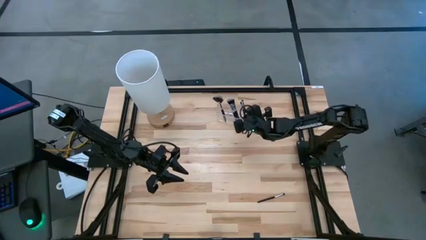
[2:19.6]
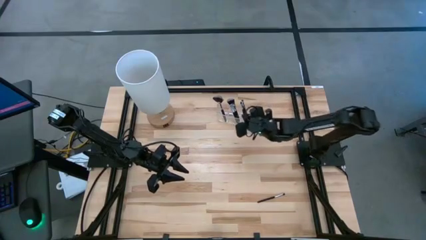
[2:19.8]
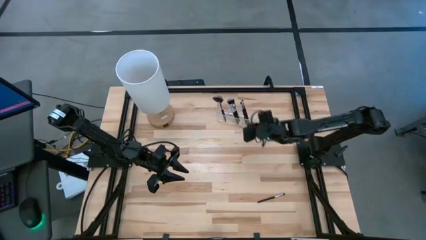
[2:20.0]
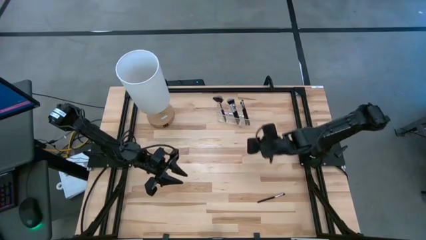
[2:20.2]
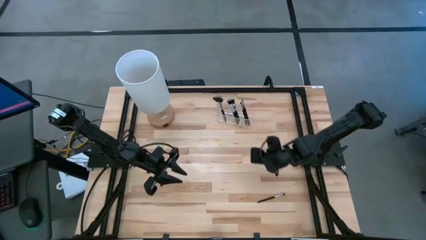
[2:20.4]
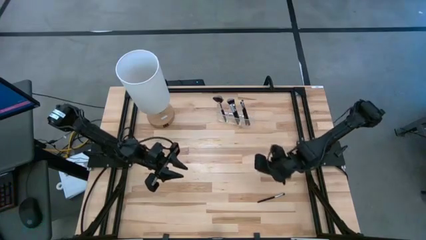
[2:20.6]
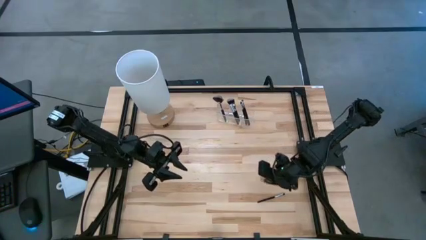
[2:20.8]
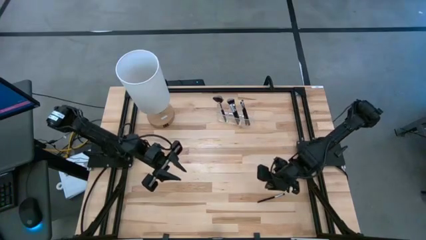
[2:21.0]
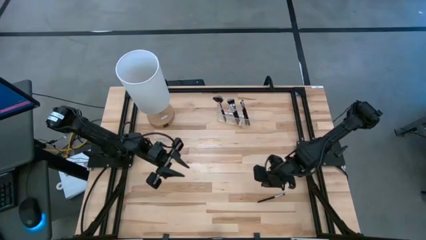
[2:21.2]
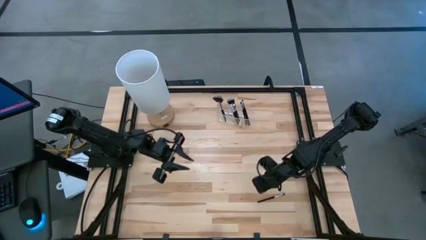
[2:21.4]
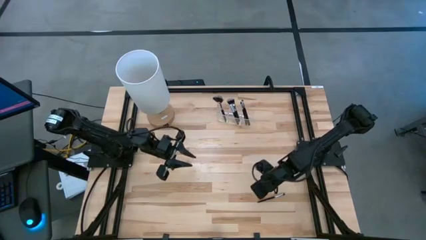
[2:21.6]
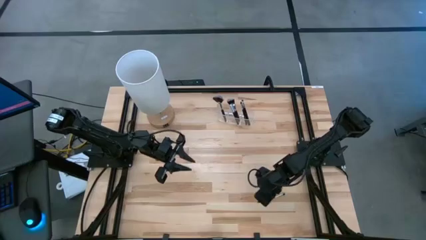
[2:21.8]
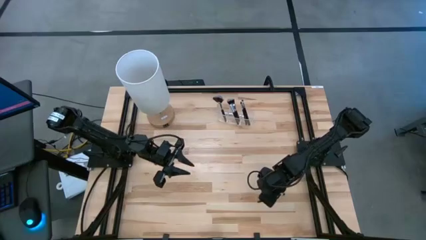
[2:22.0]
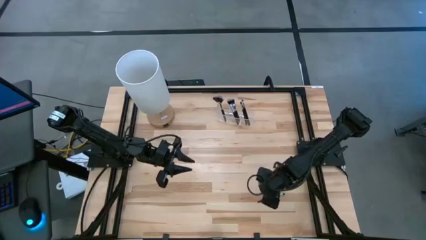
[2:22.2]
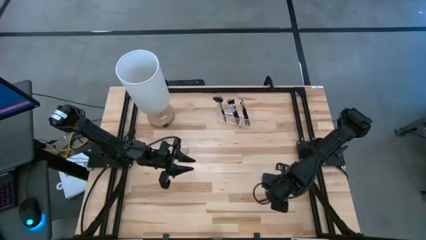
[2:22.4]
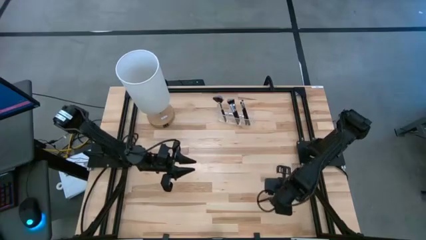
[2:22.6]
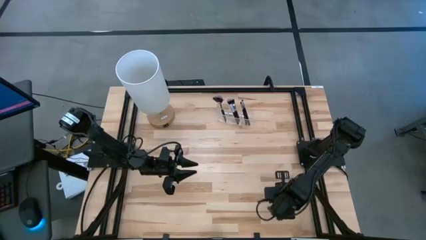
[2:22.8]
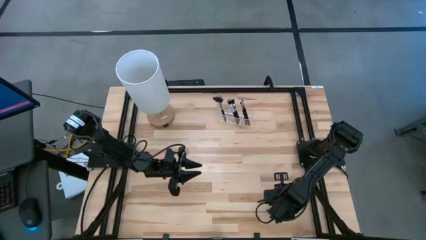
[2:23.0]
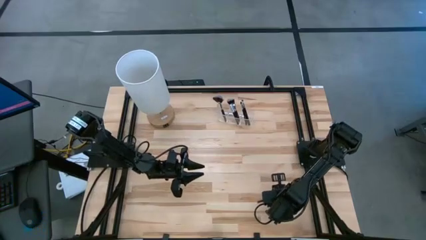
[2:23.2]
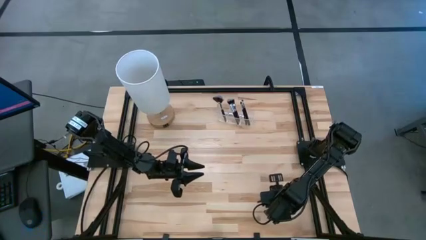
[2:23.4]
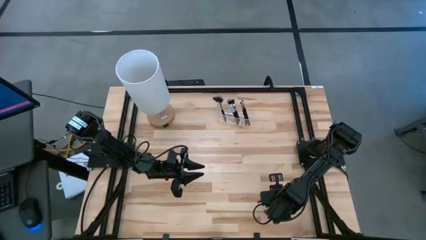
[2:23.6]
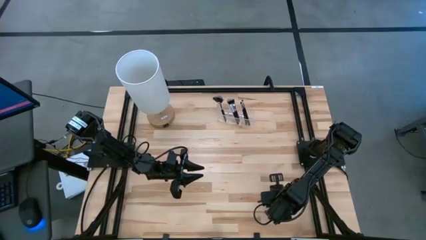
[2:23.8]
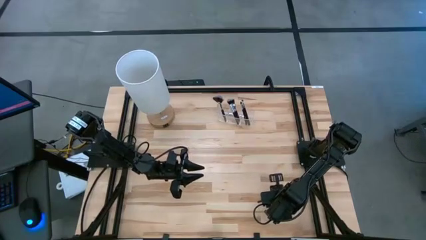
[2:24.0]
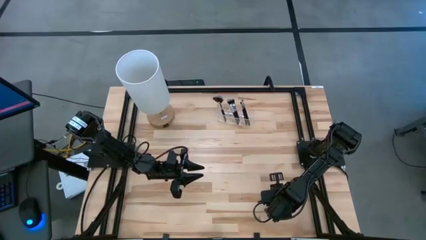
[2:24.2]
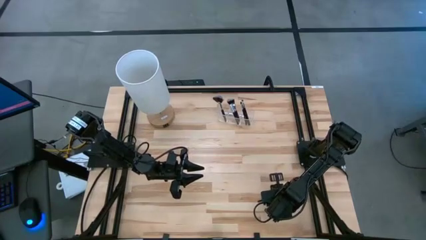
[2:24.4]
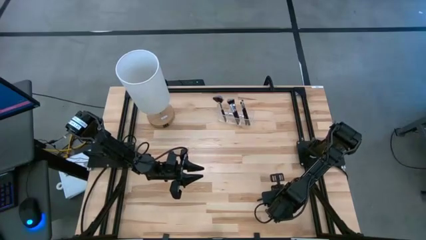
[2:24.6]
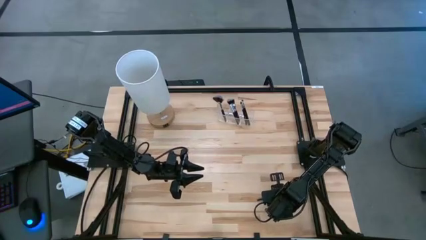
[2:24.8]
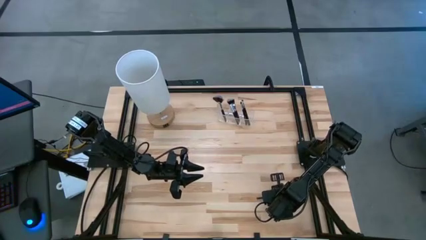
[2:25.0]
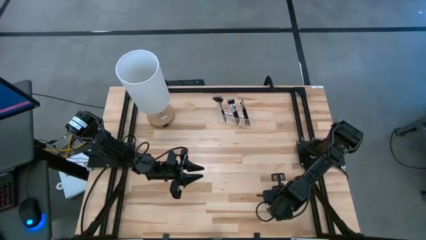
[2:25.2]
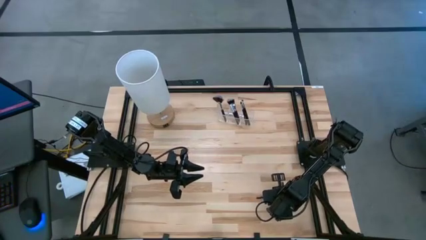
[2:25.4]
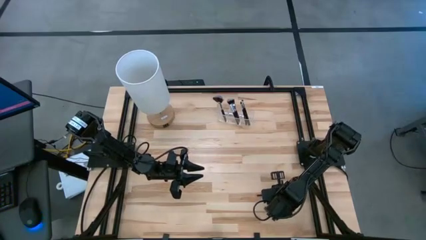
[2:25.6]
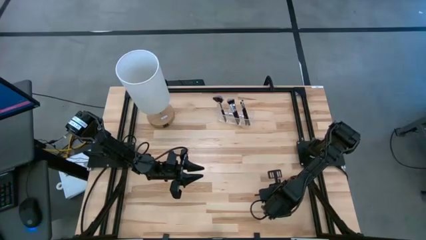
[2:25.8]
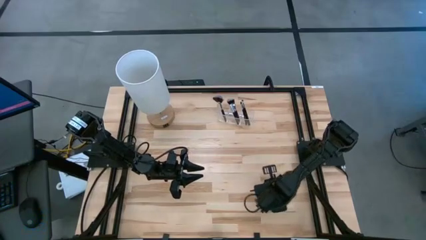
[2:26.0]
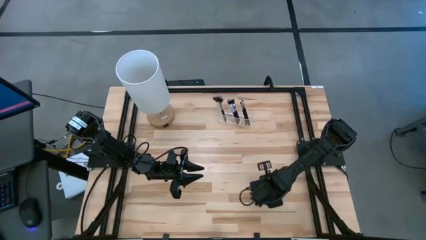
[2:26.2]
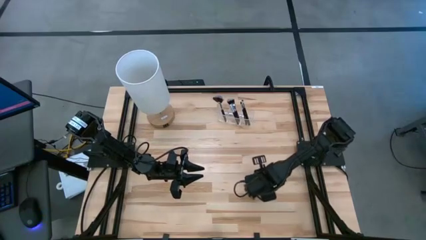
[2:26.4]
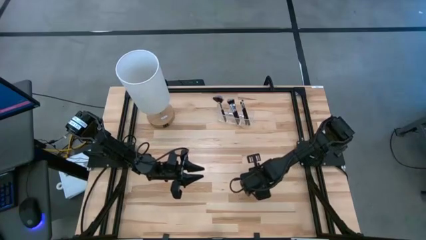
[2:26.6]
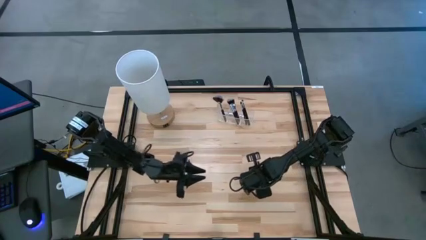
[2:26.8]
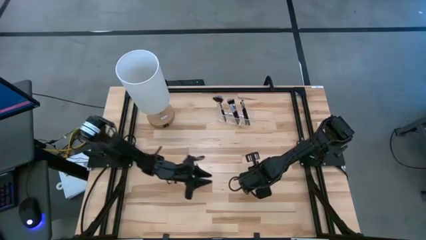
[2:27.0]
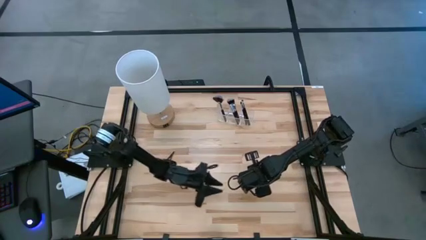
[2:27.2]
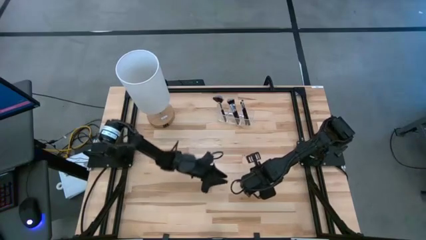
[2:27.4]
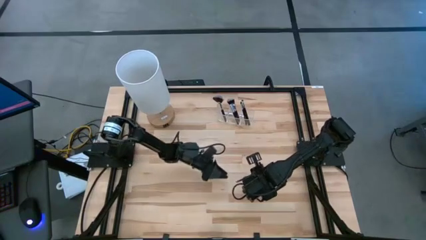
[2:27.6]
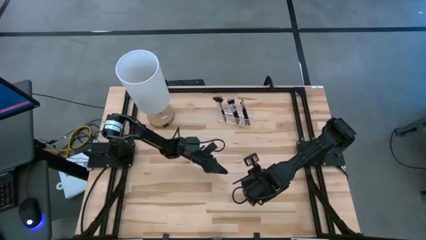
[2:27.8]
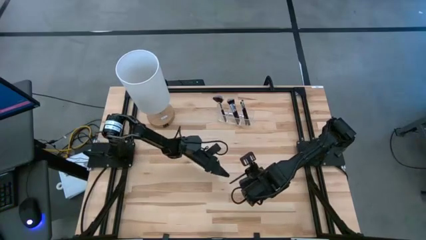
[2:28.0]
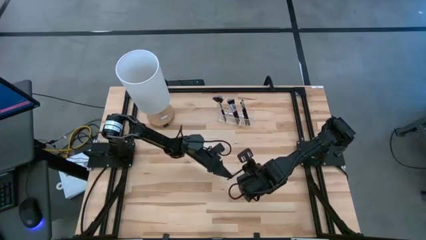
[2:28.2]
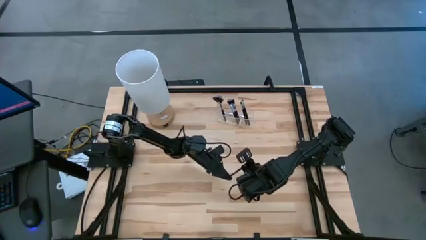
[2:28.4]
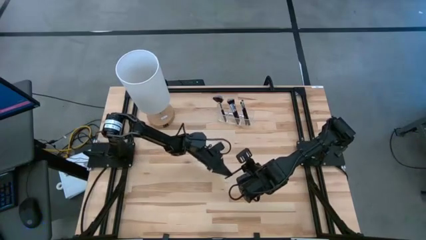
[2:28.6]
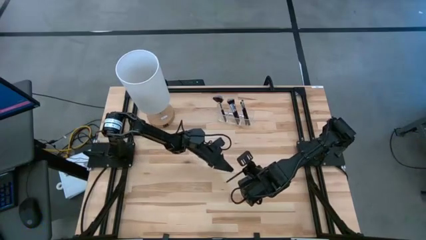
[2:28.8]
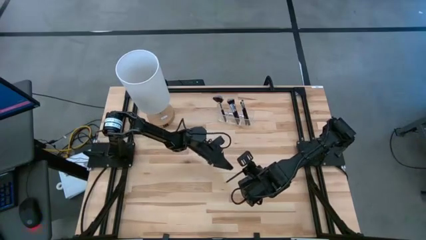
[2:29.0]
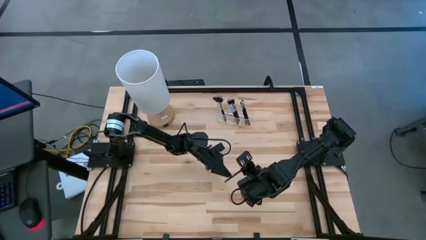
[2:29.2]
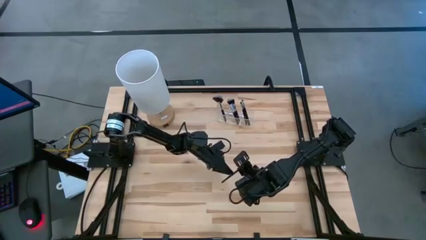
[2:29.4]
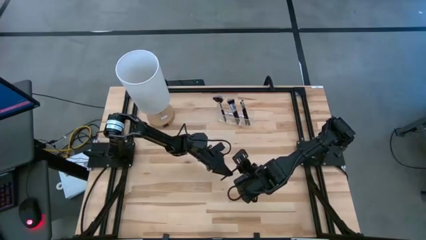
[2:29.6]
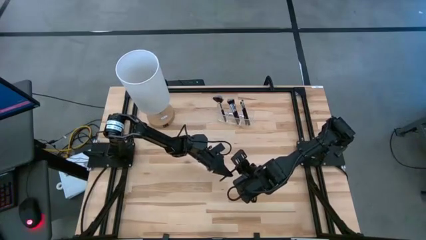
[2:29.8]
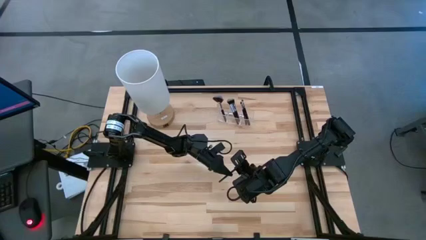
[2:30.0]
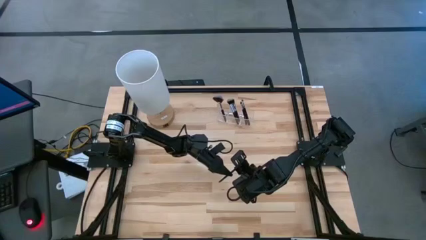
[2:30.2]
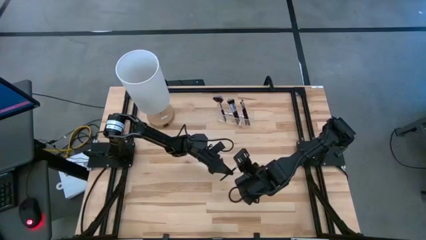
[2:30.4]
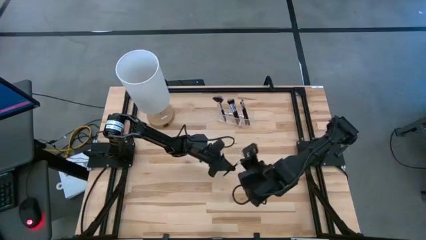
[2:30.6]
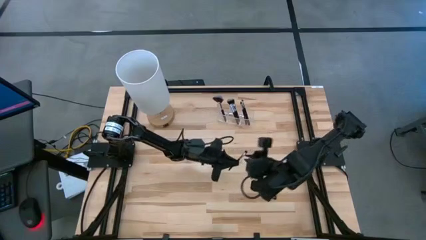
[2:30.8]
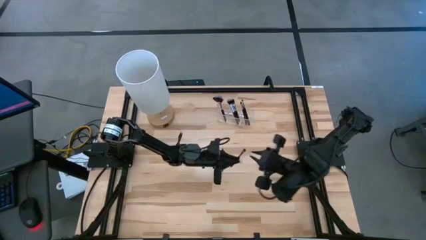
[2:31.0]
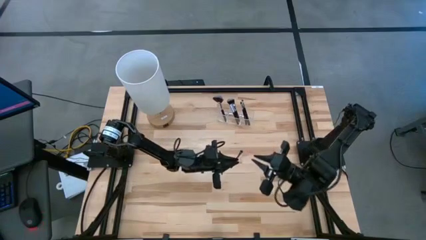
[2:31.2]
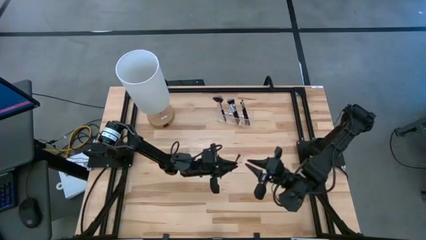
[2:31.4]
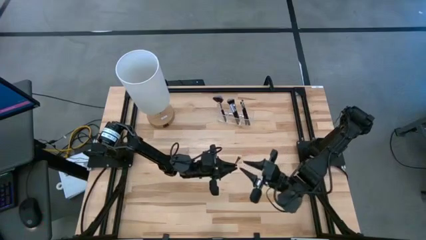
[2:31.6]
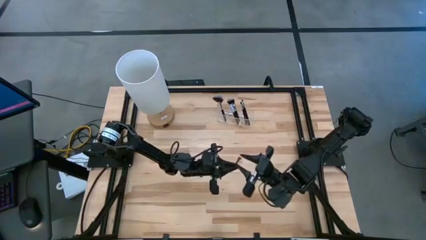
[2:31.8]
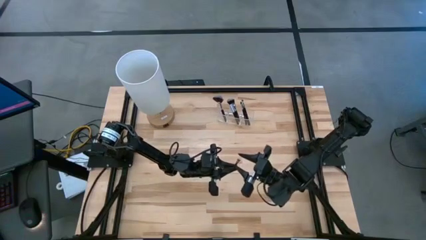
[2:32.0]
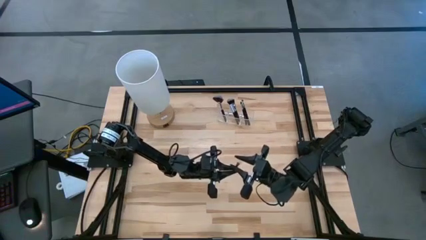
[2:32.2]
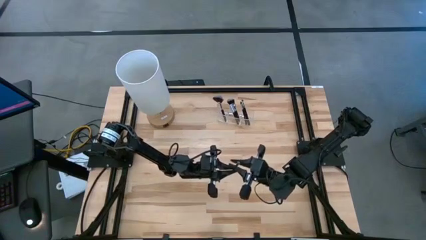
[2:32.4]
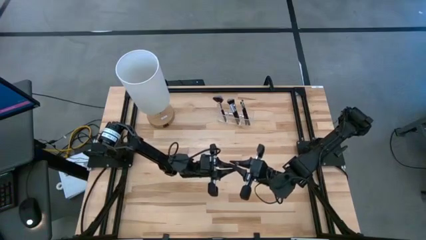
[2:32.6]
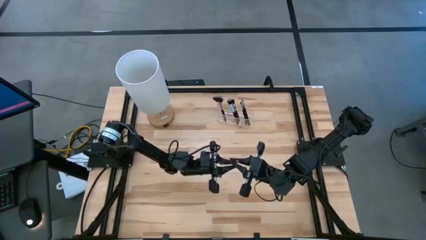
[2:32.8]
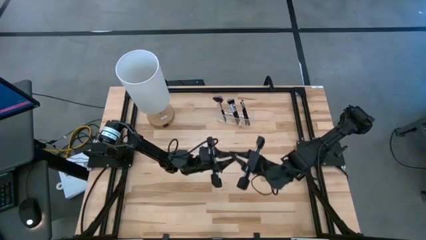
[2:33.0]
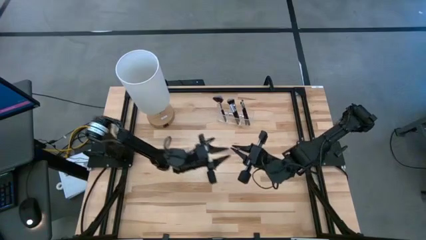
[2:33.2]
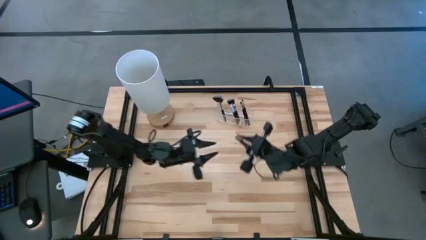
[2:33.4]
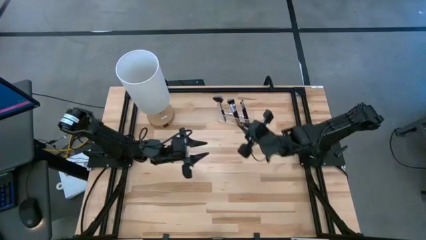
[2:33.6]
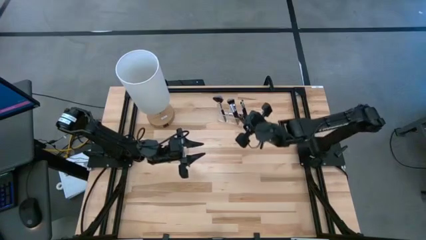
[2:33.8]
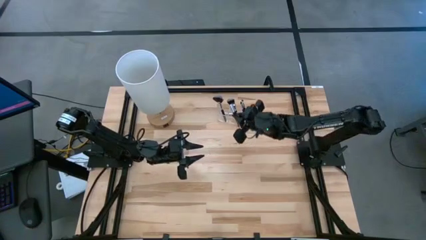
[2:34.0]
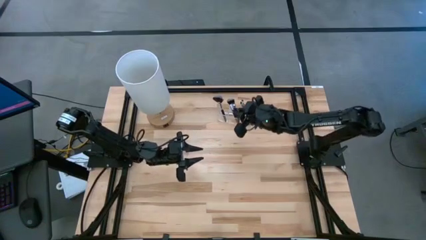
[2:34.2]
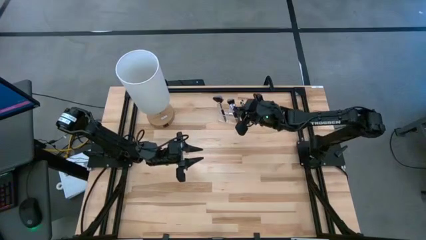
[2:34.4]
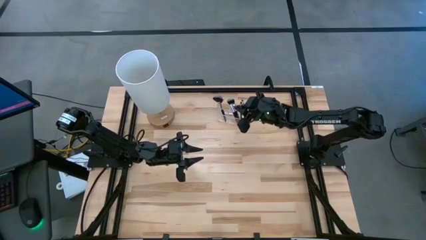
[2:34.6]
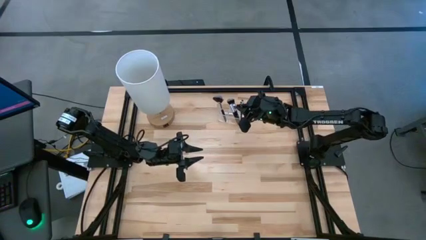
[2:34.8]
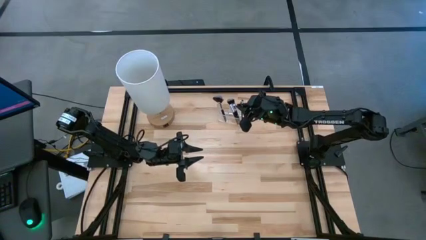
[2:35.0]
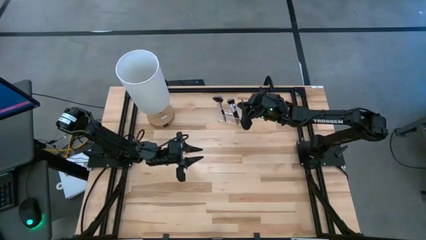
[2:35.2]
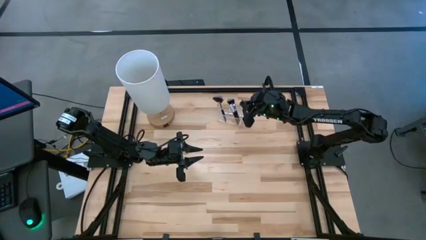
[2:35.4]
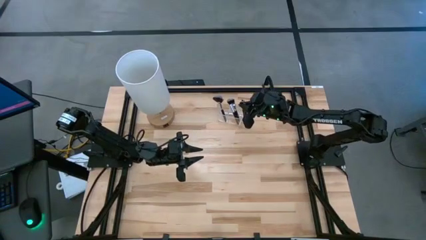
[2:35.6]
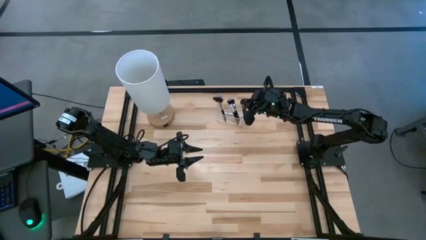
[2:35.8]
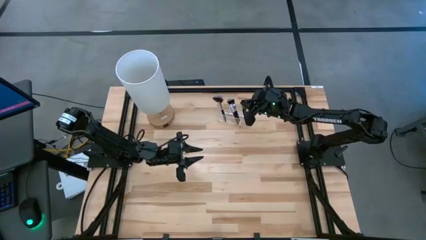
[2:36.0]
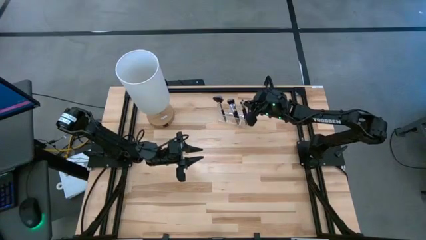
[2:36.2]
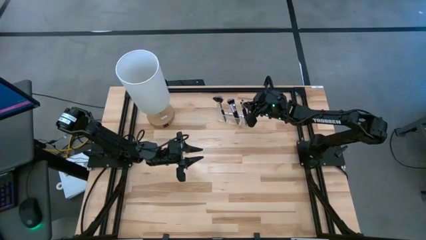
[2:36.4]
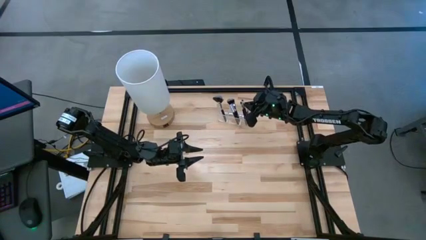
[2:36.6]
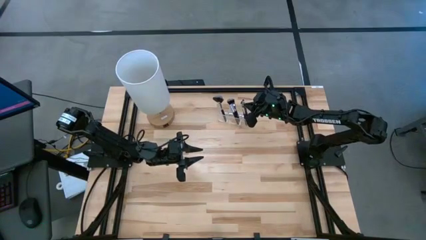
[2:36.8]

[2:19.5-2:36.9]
Task: Put items in baskets/containers
Put the black eyeshadow brush into the transparent organizer
